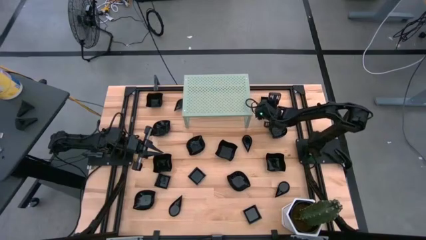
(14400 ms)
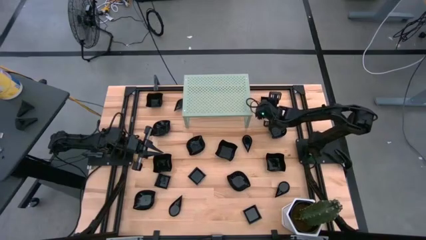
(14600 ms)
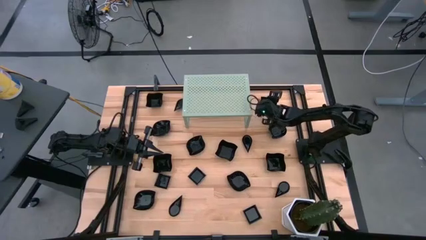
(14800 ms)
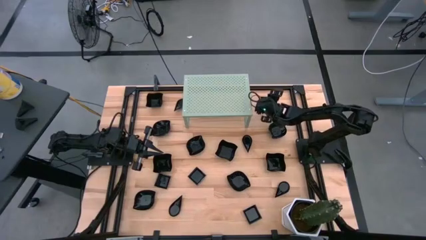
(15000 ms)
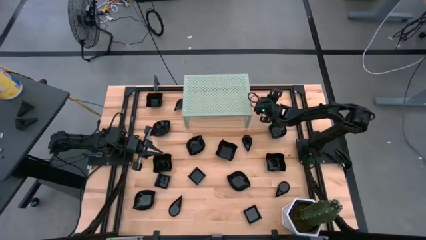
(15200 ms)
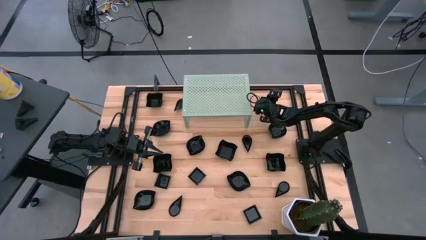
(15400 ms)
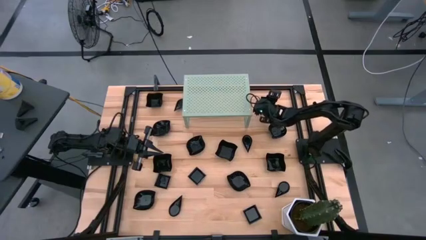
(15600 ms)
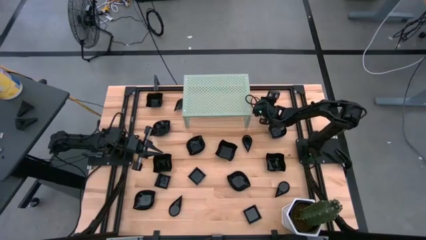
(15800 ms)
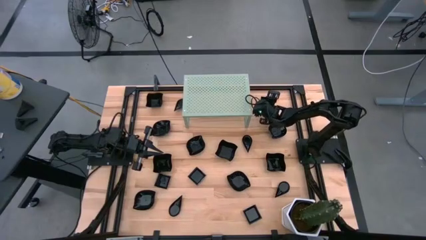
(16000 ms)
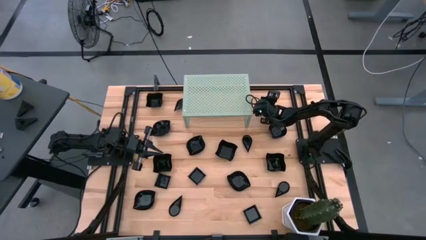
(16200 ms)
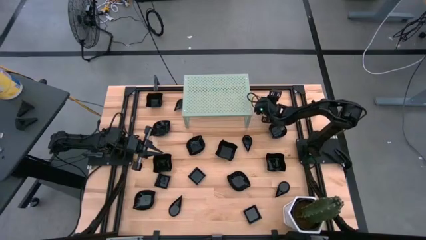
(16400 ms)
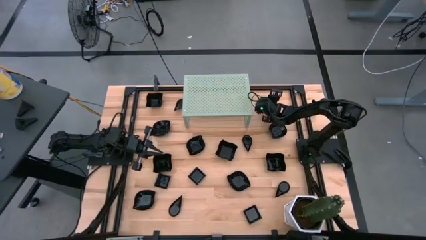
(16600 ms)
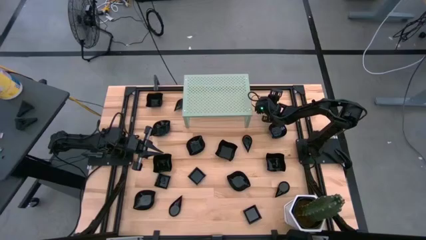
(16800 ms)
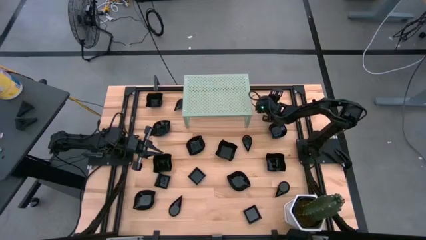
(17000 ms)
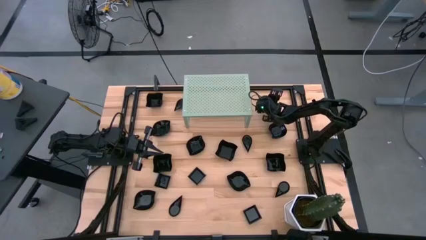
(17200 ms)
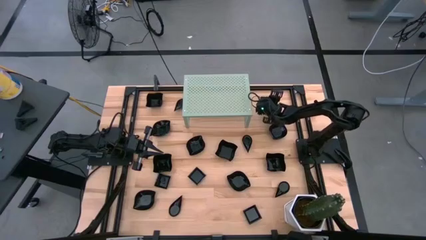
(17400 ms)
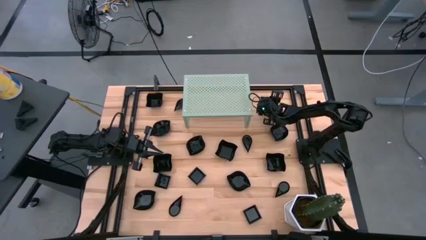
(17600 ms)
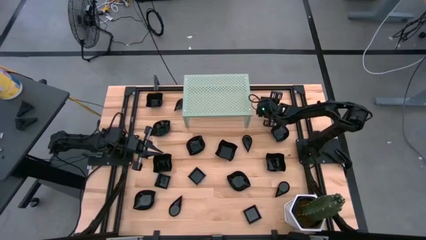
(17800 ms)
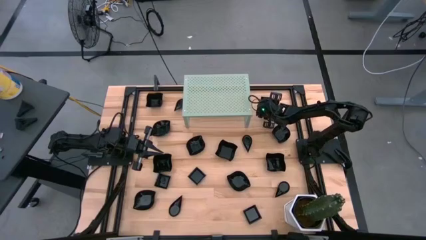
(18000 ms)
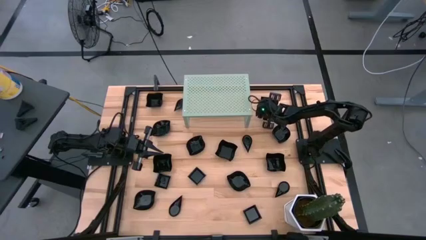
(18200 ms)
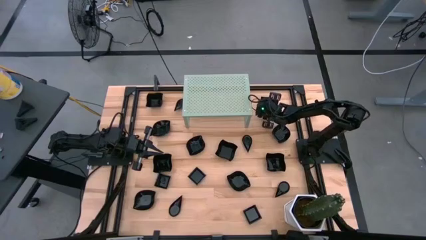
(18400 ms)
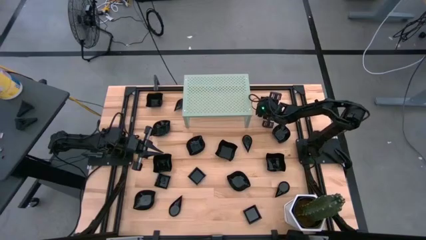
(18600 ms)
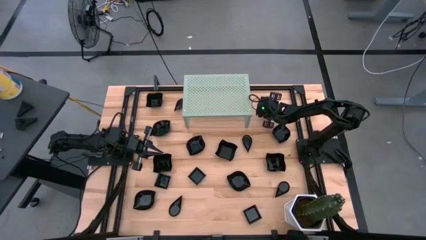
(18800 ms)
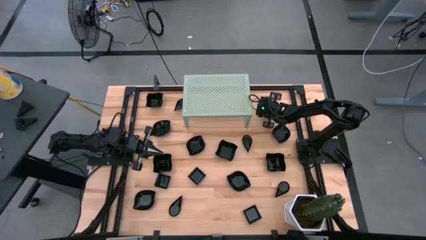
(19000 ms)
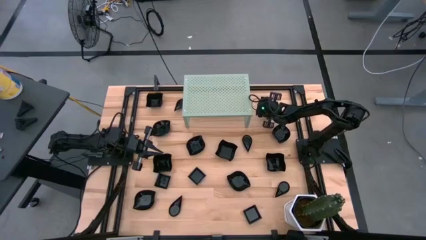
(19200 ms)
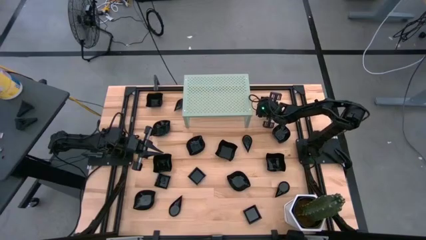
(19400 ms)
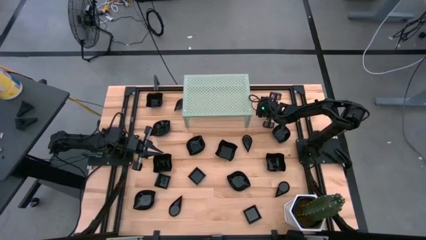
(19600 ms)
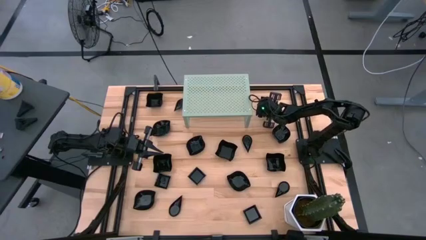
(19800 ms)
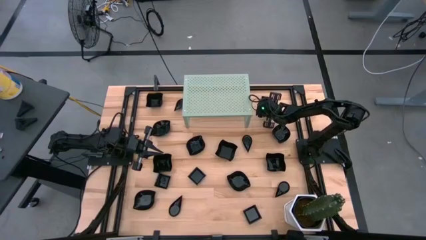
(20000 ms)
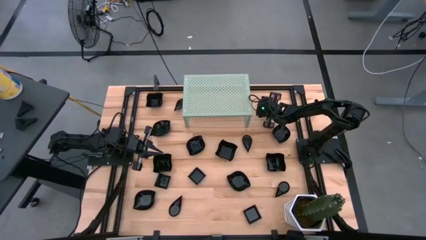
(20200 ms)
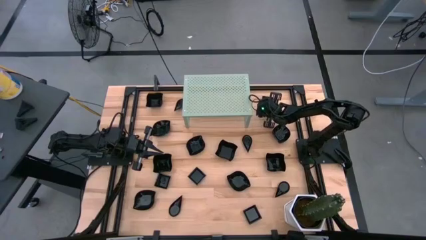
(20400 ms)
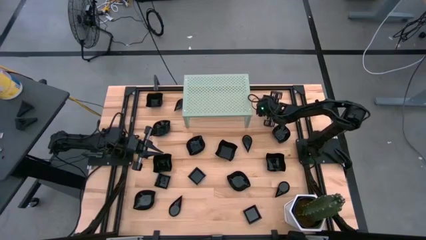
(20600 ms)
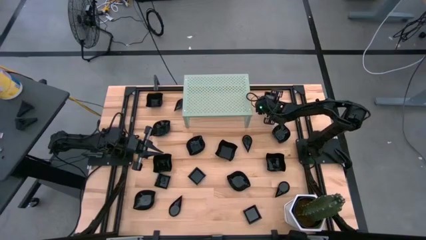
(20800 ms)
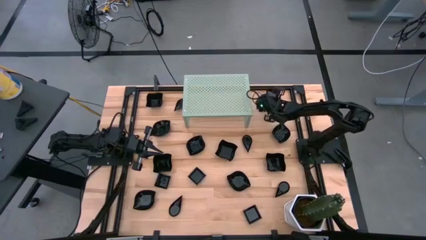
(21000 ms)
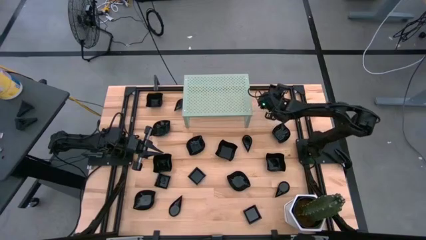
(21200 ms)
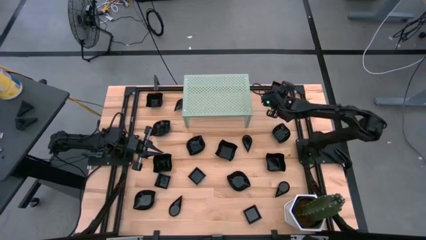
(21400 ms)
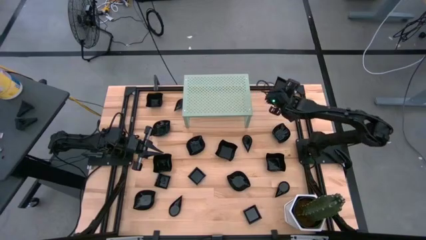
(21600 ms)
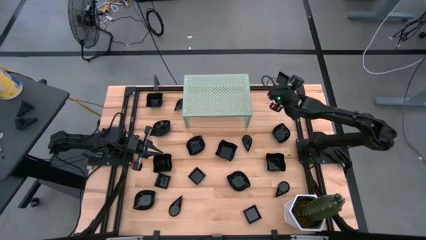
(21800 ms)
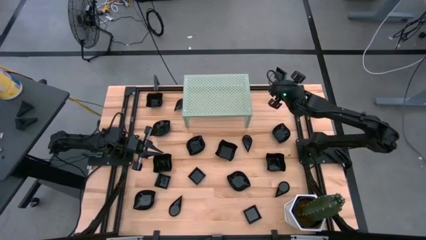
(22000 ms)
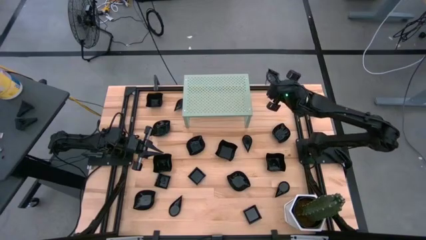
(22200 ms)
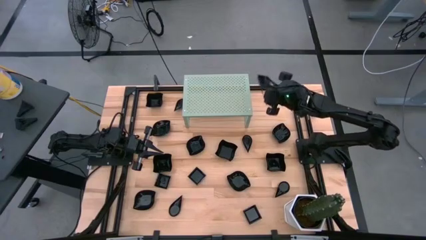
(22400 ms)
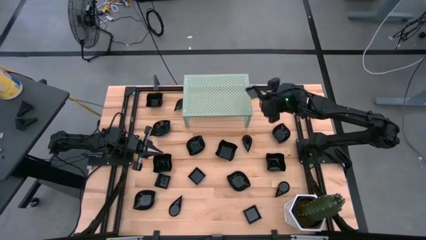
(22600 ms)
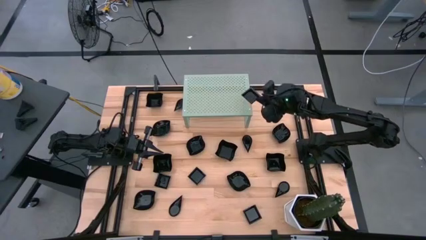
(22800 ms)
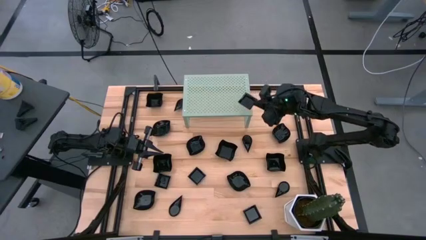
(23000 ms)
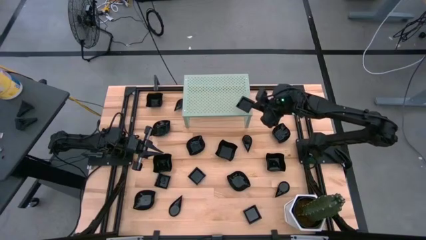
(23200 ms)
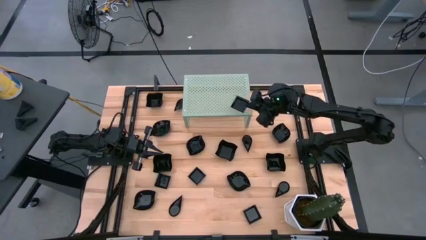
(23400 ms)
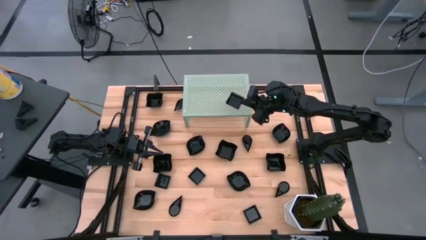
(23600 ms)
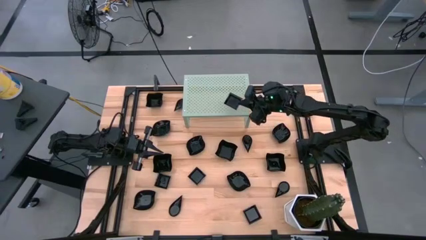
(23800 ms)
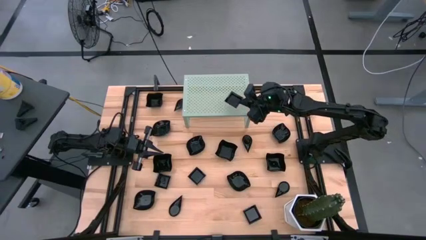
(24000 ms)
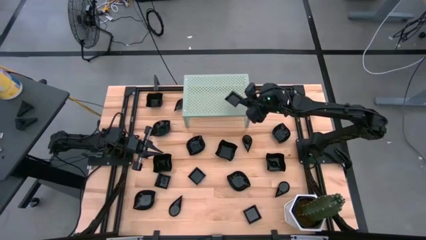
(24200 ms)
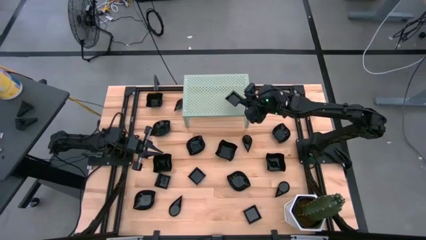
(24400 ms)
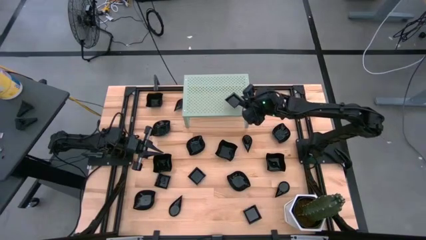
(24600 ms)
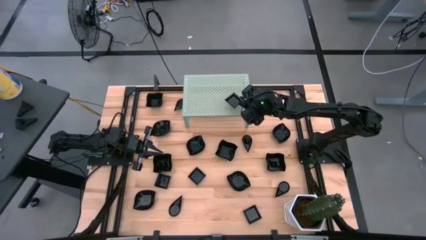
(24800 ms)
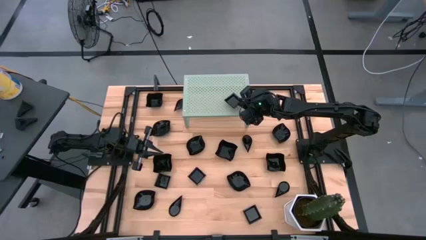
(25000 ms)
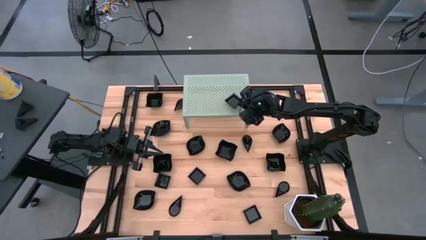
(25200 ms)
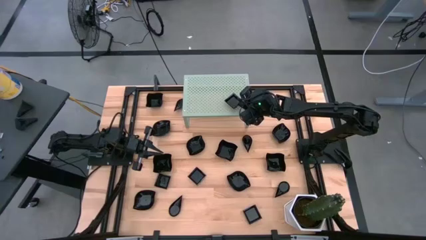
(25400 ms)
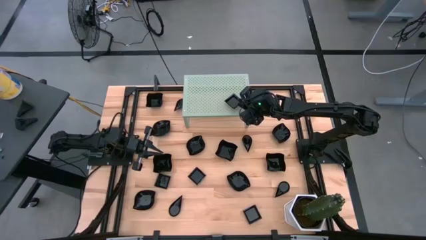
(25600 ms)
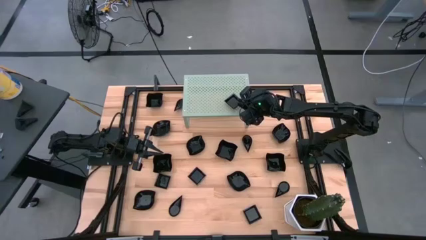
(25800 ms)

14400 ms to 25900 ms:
Task: Pick & Place Mini shaped plates
Put the square plate on the shelf

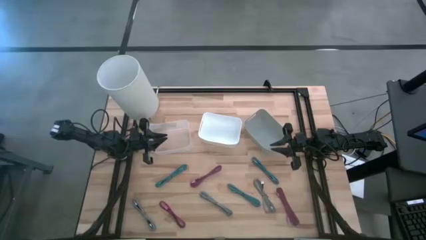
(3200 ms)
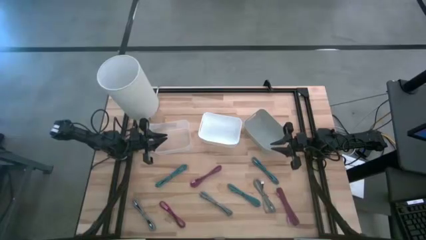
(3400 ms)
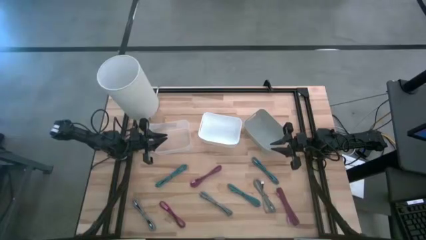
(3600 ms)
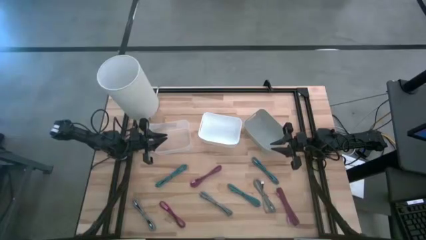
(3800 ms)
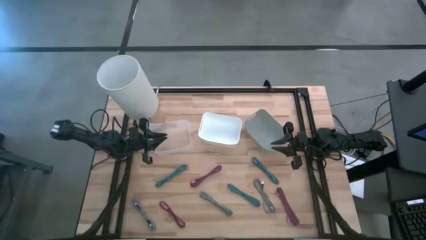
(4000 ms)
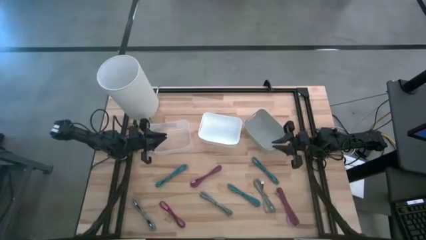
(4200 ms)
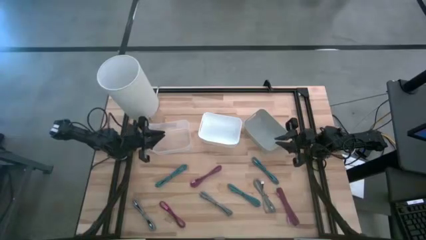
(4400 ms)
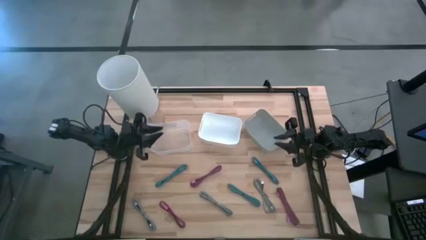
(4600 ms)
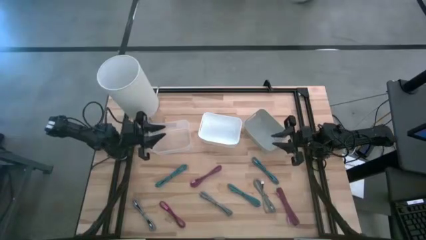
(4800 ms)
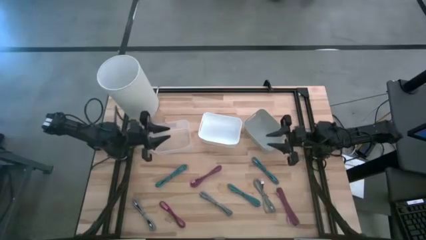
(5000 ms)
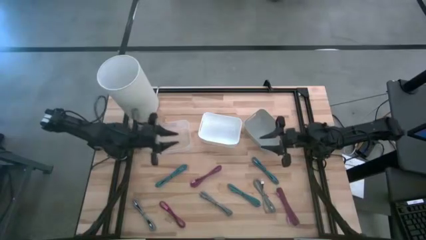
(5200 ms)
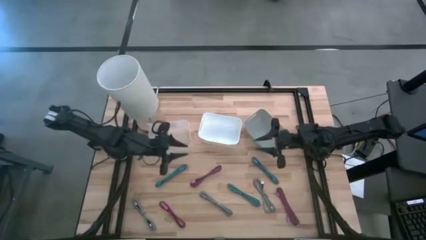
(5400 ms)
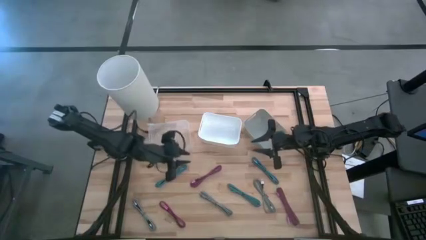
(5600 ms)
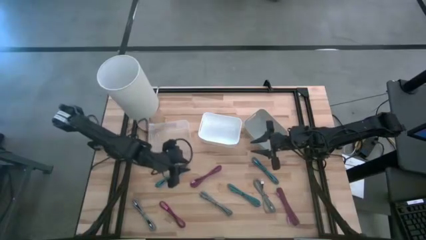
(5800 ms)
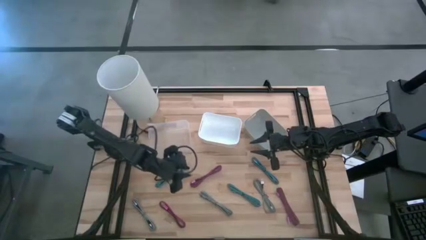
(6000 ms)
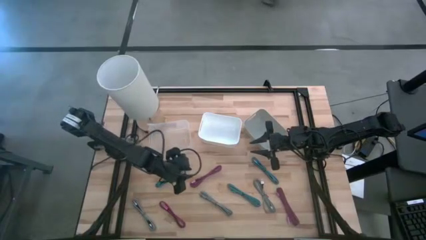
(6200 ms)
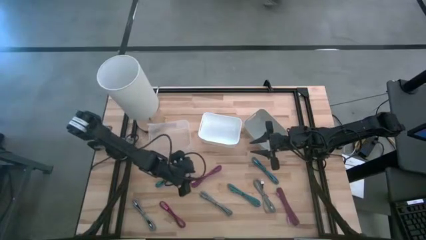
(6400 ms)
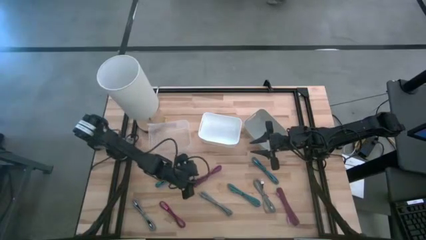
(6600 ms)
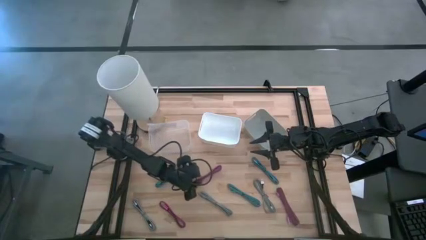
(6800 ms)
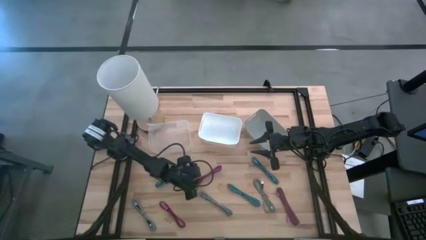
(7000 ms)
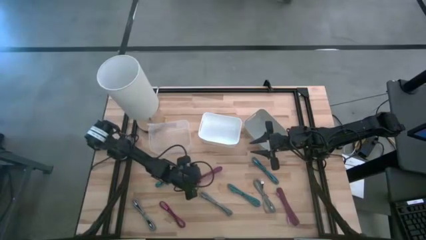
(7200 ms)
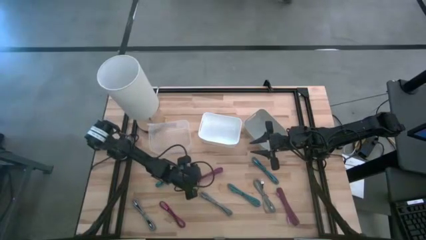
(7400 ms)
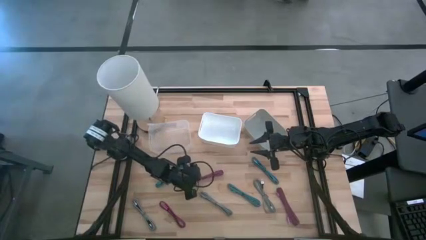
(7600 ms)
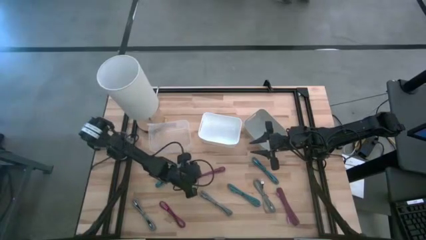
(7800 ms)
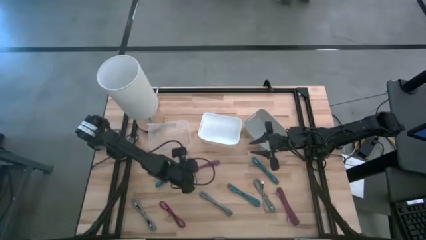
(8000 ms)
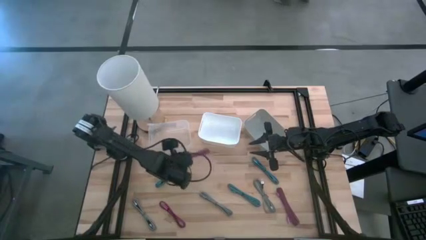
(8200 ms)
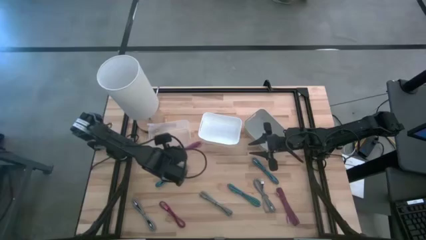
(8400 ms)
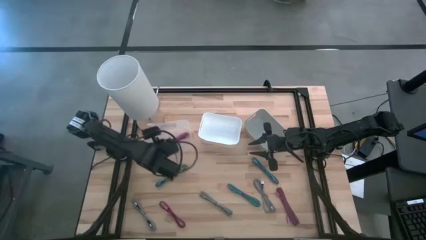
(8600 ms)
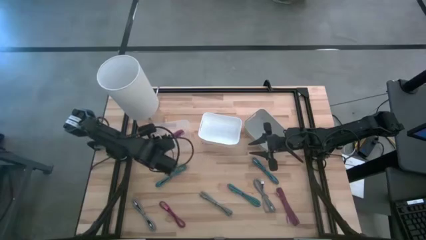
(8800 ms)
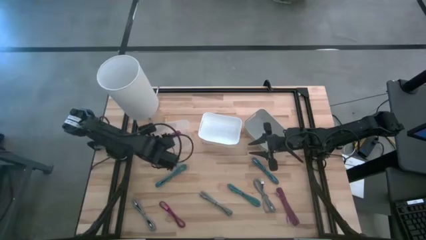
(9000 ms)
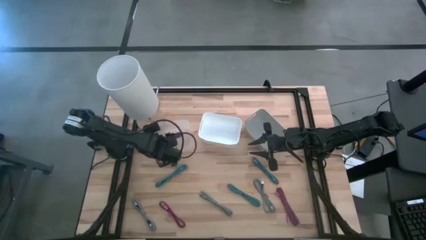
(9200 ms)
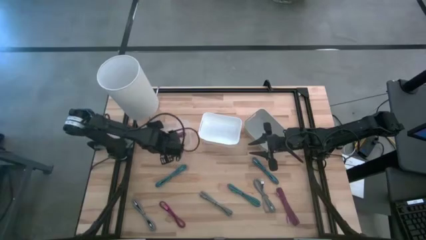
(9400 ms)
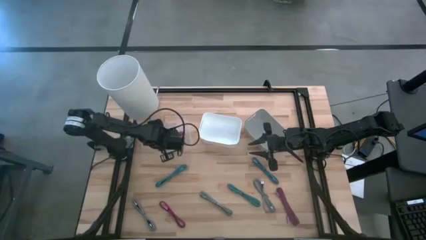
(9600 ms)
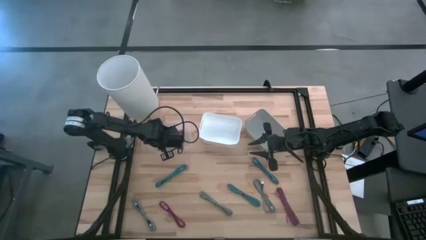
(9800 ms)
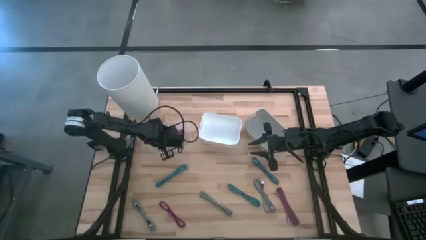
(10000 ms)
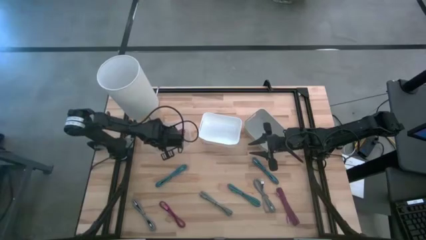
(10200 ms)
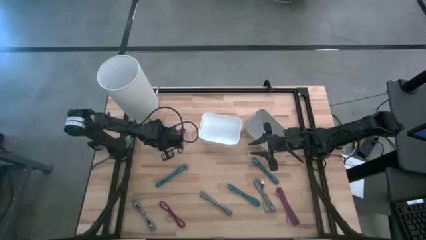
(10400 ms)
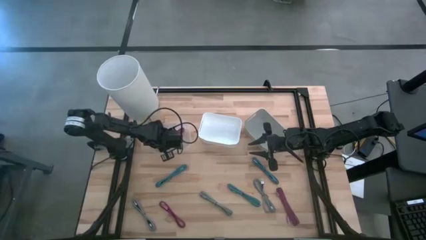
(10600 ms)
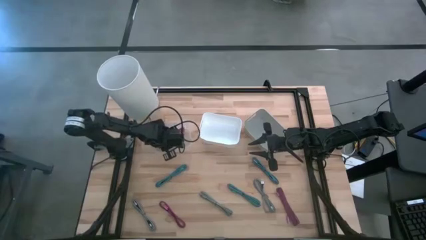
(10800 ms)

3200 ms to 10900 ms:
Task: Pick & Place USB Port
Put the top pink patterned charger cable into the transparent bin
